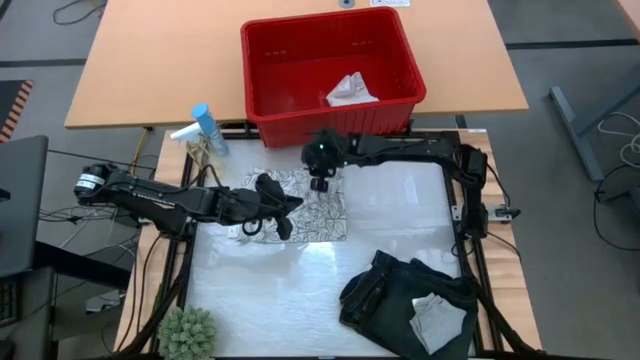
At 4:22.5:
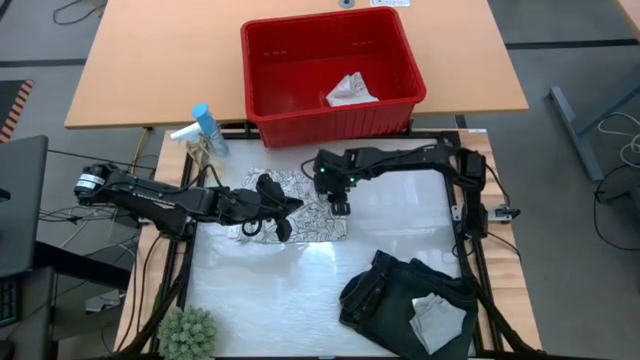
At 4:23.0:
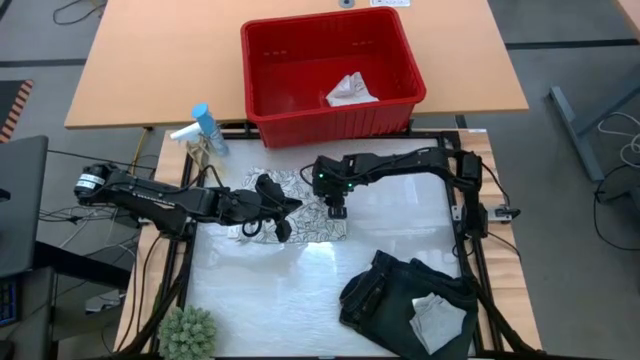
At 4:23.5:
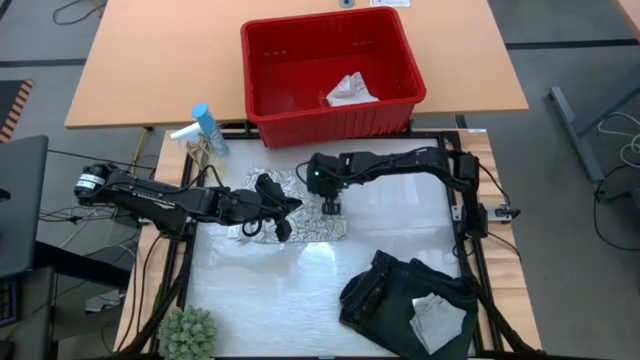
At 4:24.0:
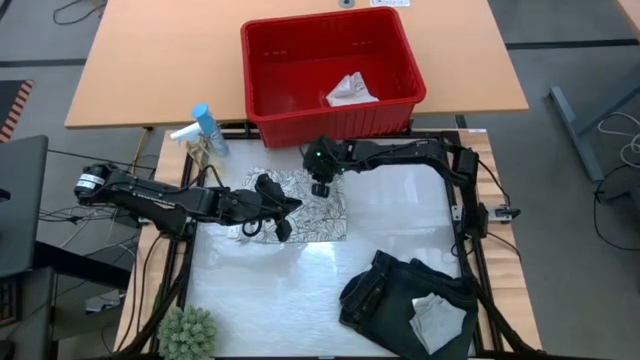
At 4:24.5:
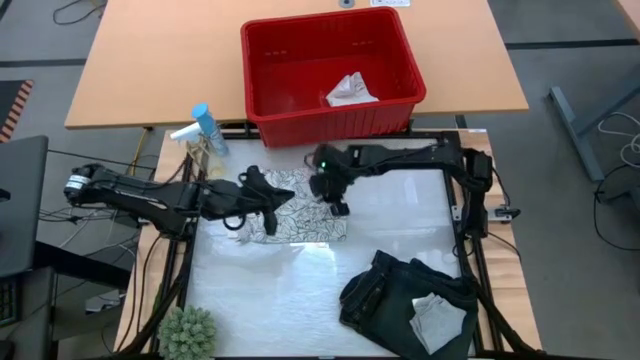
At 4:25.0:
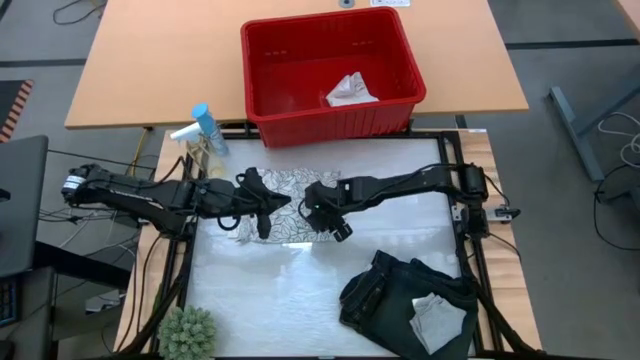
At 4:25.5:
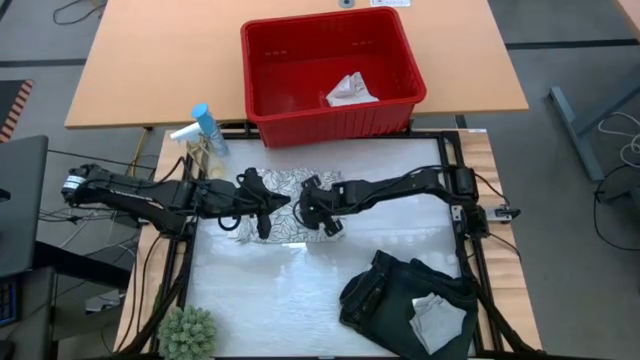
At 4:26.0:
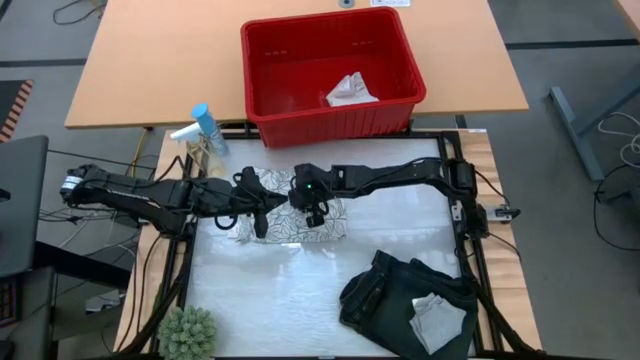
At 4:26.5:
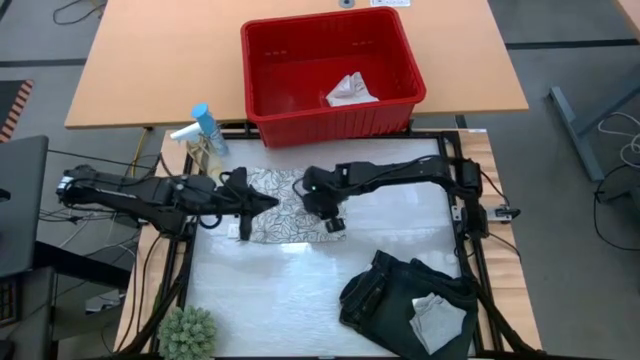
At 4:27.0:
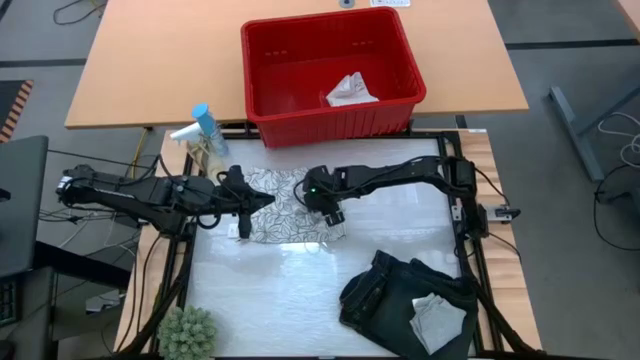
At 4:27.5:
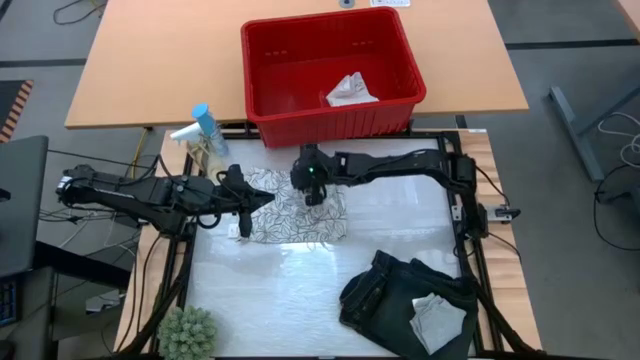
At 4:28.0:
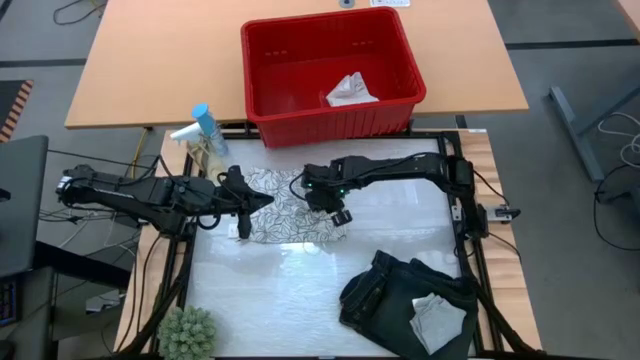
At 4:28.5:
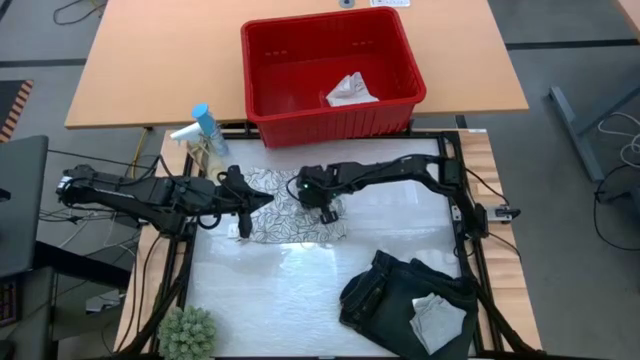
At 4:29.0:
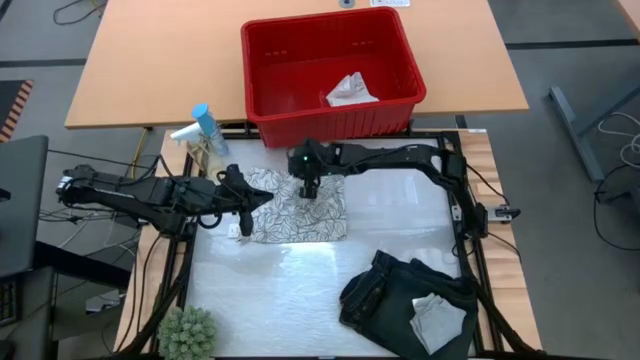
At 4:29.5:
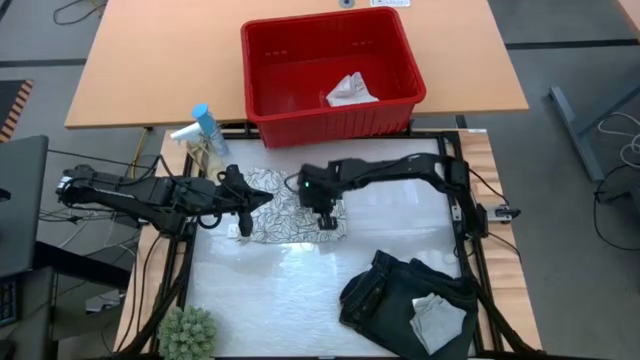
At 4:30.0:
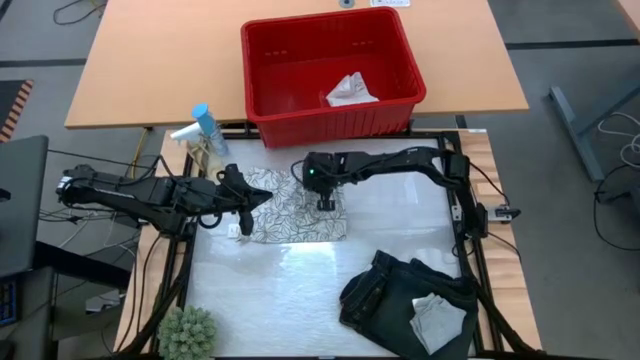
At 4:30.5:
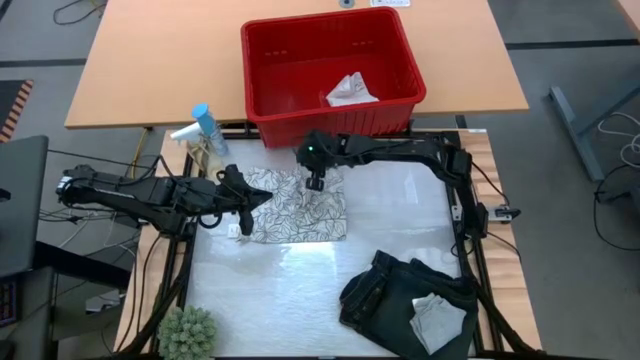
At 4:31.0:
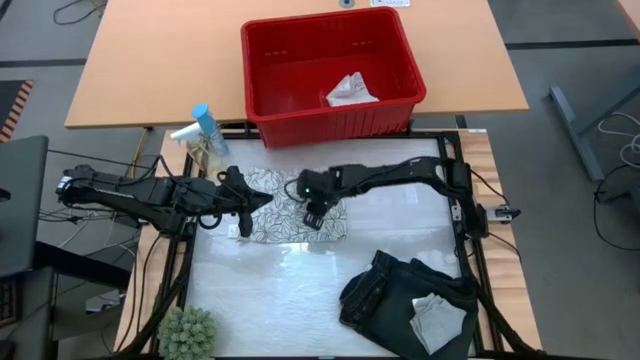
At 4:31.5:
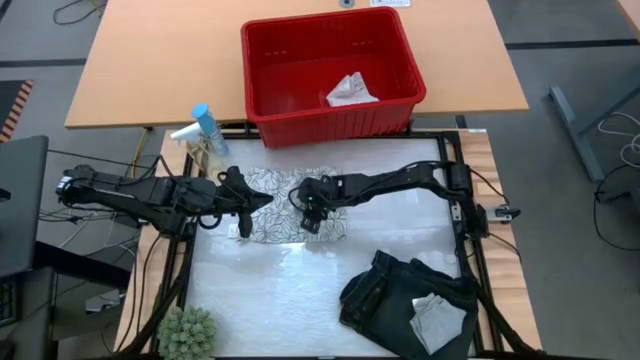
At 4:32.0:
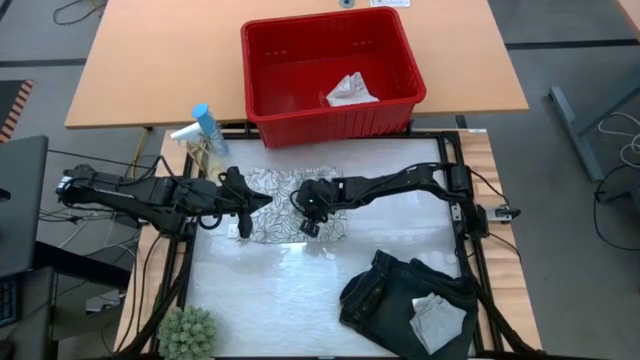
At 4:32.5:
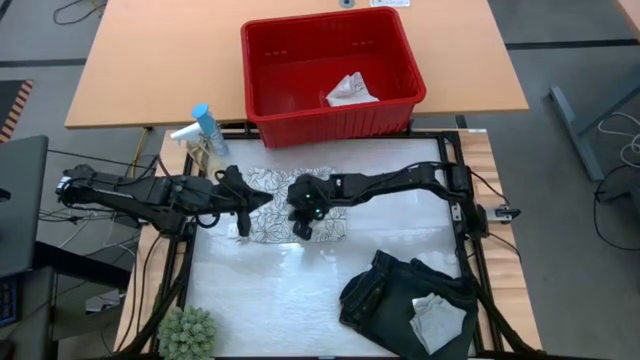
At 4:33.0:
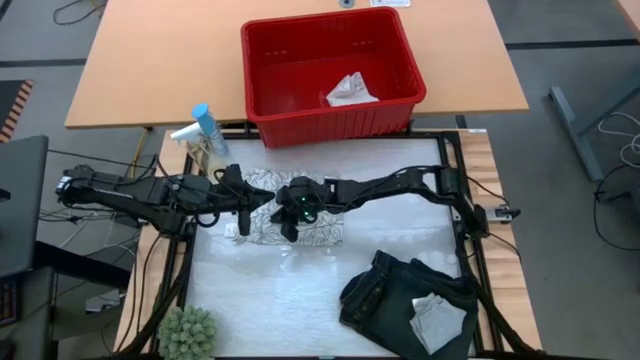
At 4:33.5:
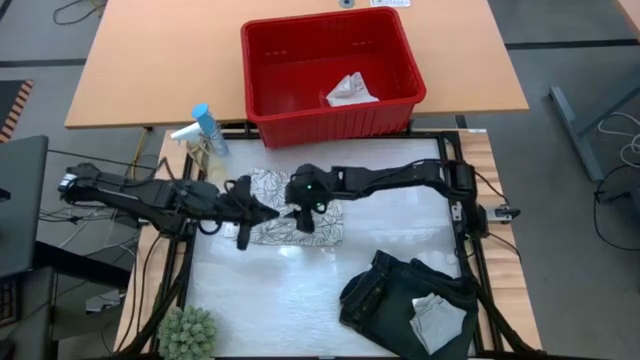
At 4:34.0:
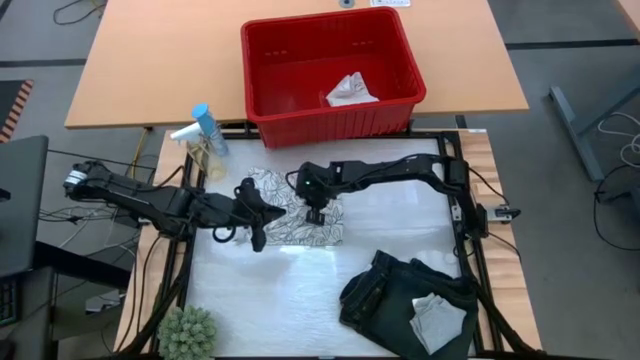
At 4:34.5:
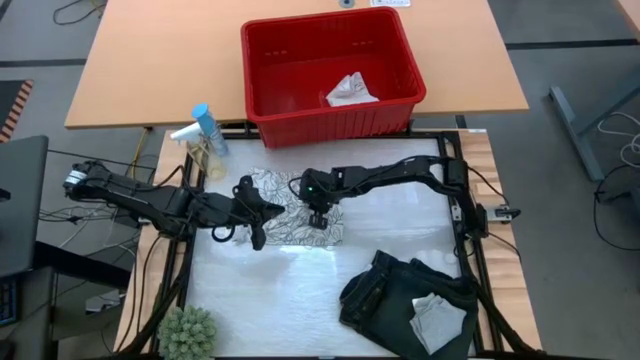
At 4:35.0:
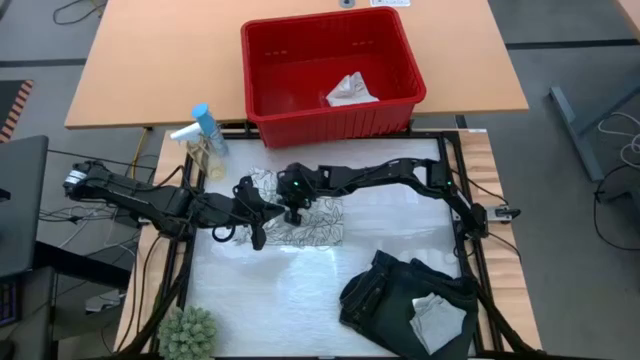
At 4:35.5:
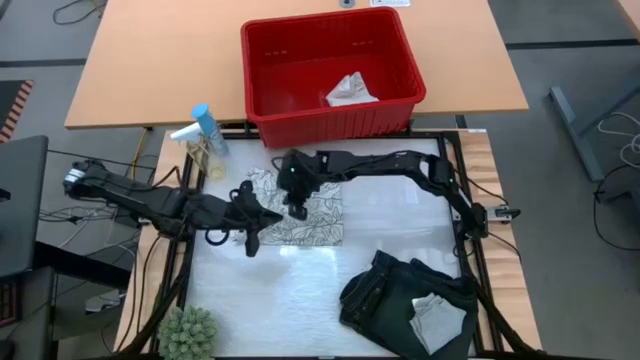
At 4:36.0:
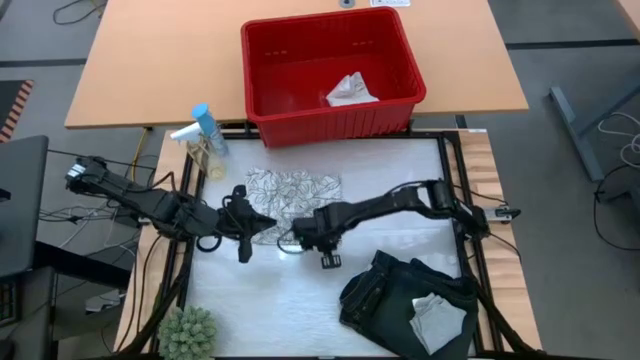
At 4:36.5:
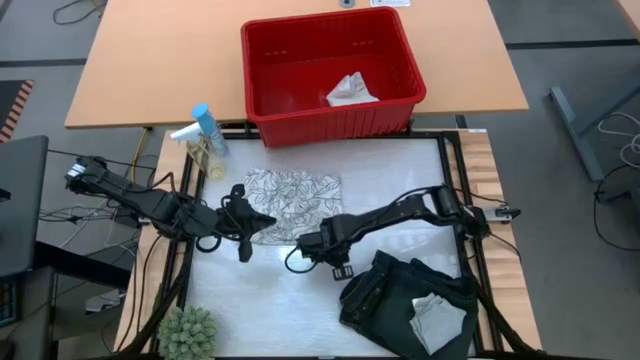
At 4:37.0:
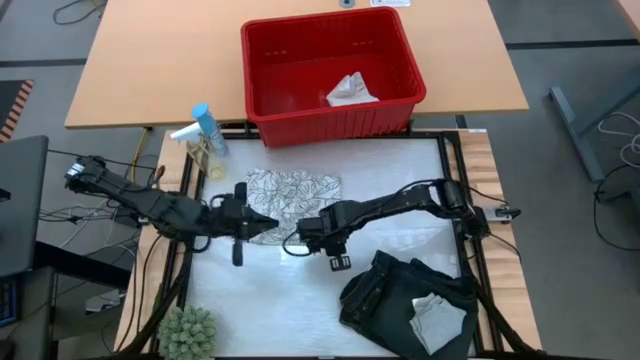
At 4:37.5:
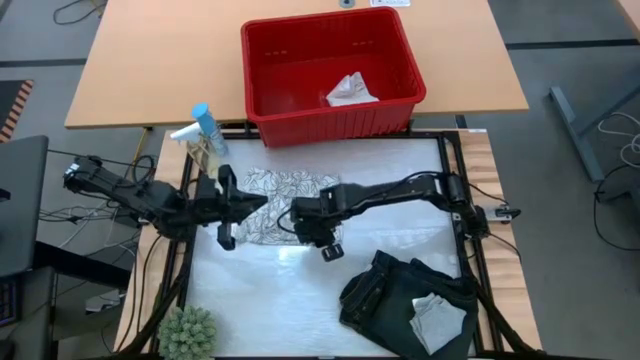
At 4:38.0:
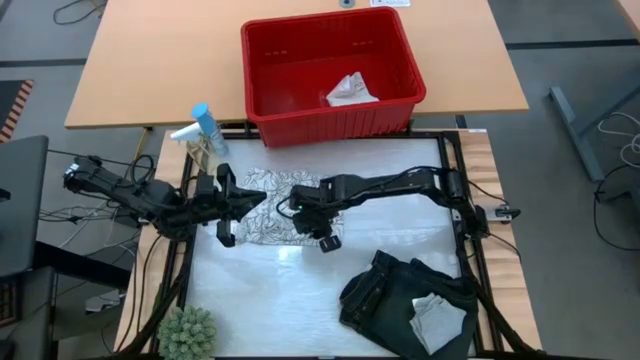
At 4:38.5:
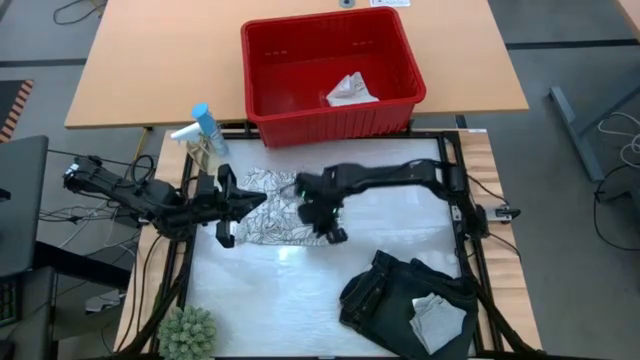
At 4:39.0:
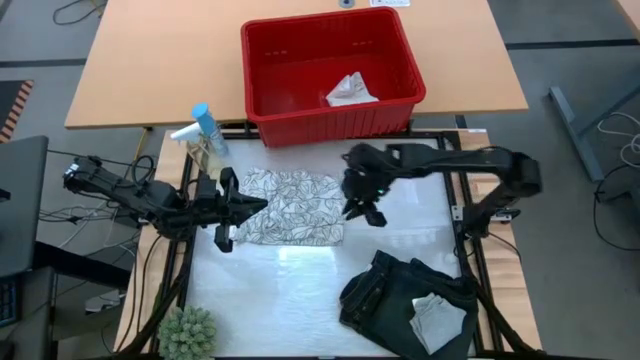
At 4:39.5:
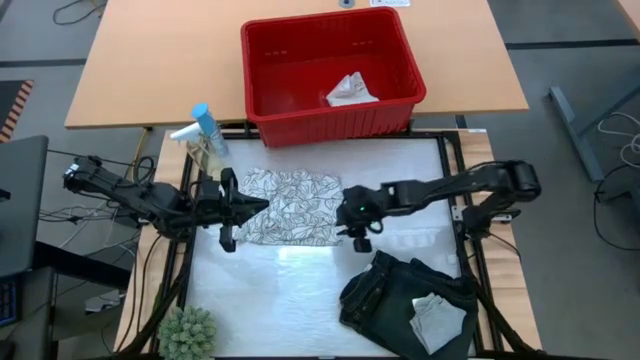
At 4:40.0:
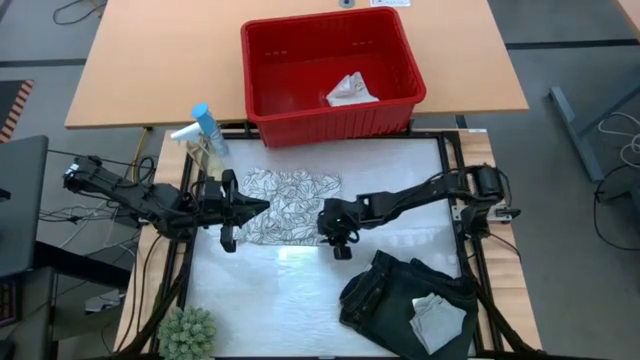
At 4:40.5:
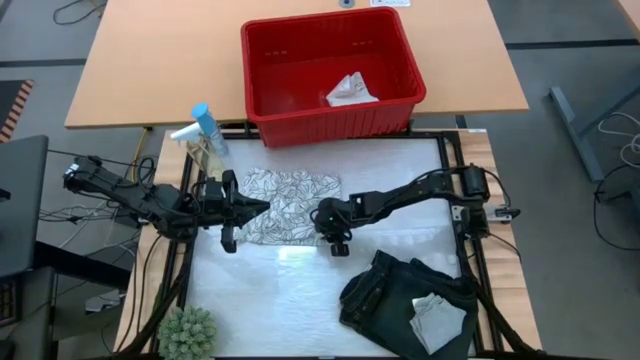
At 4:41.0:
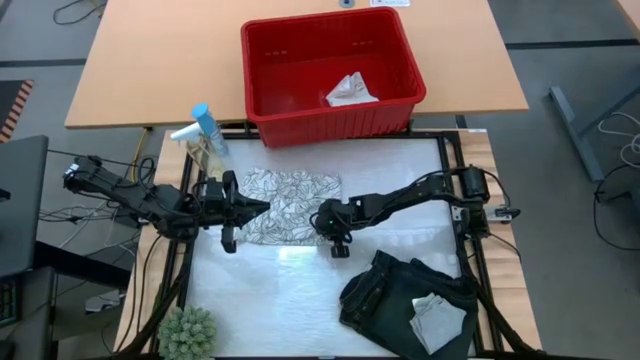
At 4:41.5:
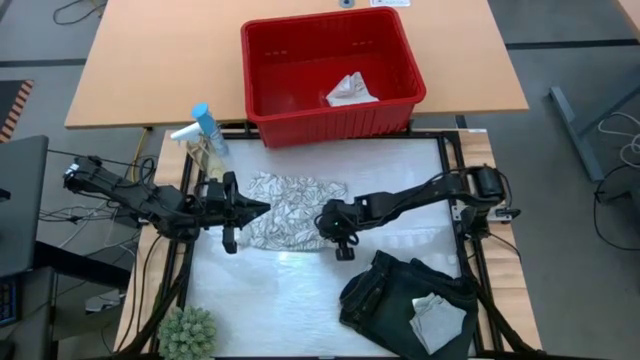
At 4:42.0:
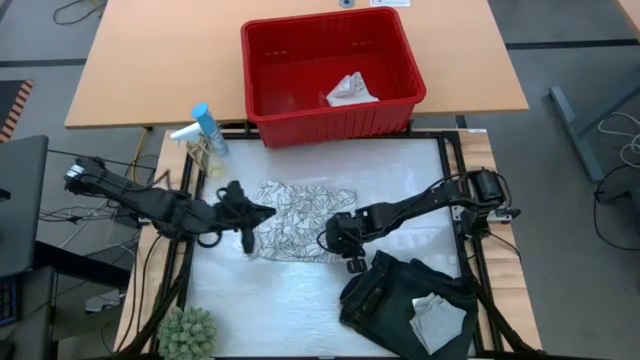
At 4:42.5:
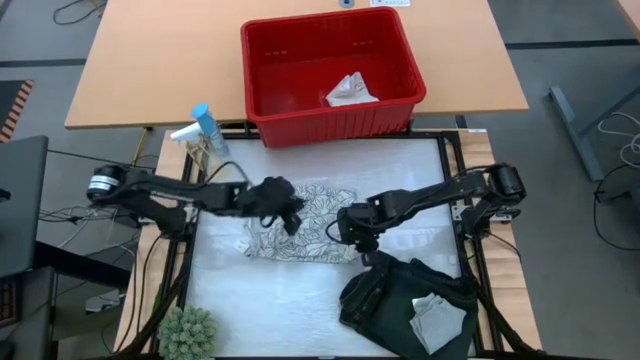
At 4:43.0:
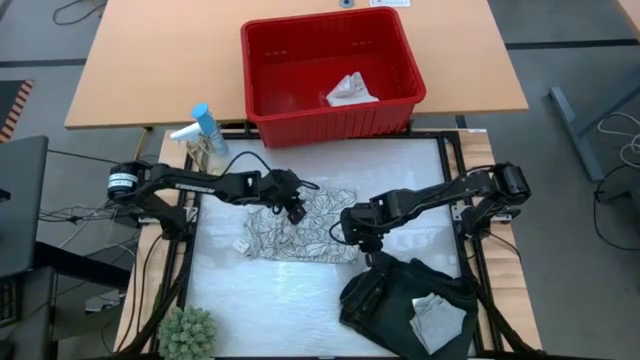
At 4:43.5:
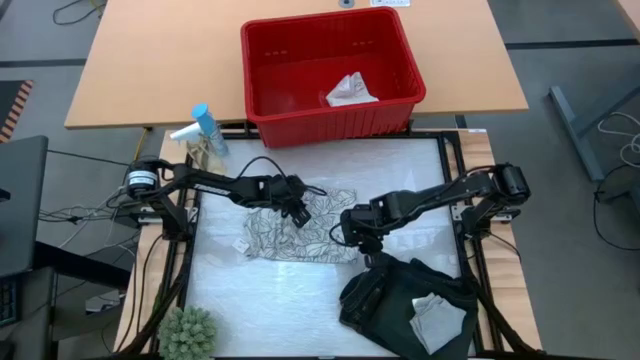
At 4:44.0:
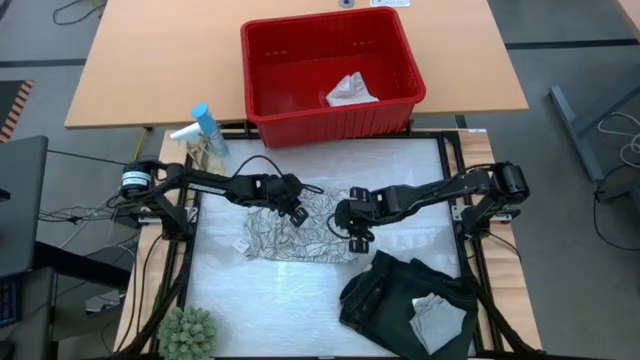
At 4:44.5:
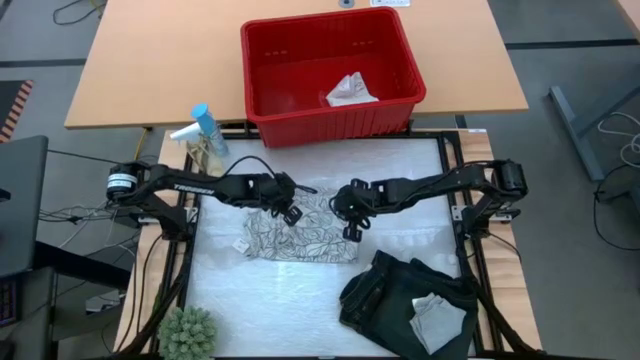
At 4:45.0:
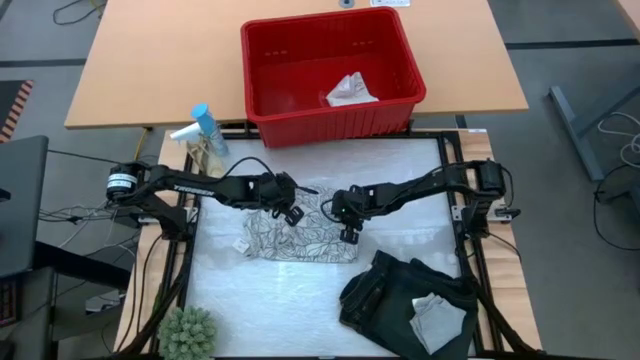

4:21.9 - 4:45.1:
Task: Fold Laundry from Bin
Fold the white from the red laundry bin
